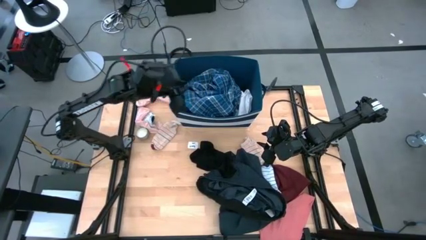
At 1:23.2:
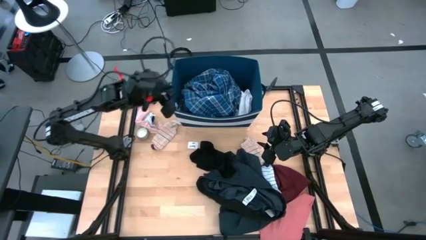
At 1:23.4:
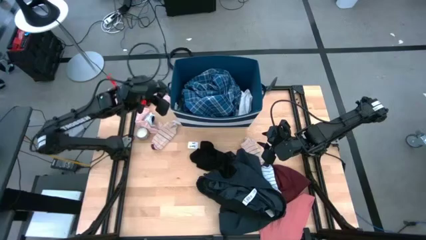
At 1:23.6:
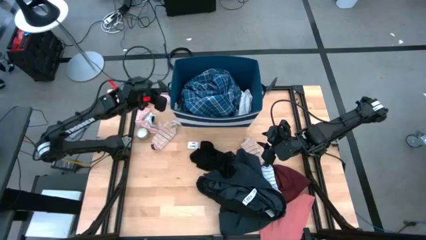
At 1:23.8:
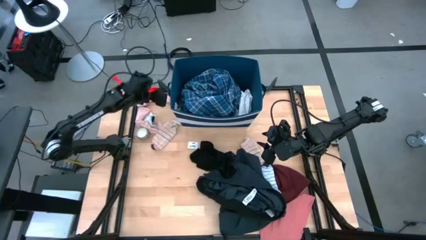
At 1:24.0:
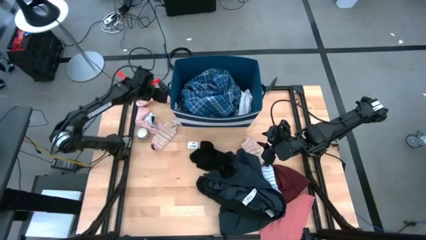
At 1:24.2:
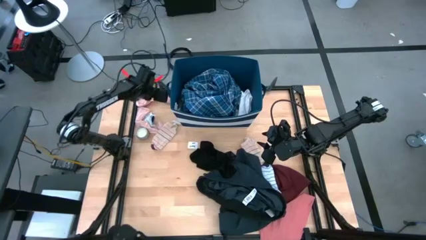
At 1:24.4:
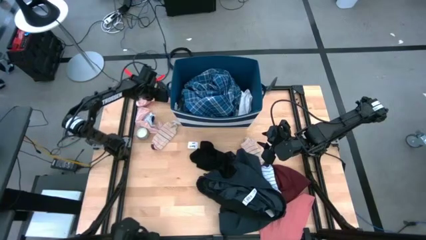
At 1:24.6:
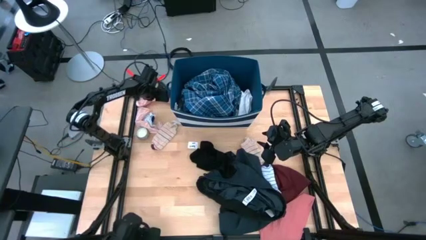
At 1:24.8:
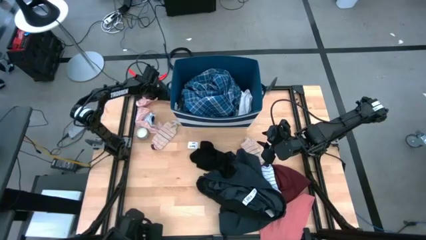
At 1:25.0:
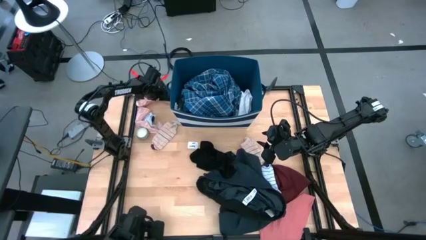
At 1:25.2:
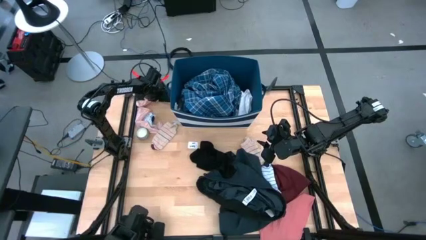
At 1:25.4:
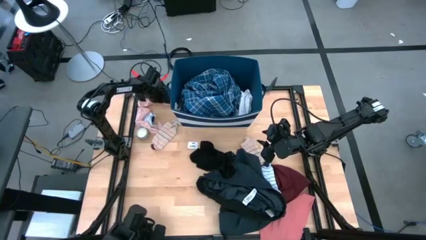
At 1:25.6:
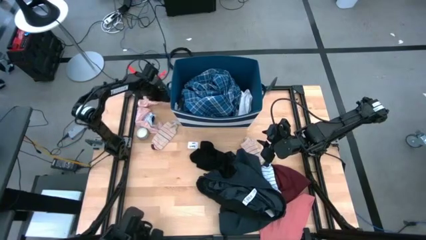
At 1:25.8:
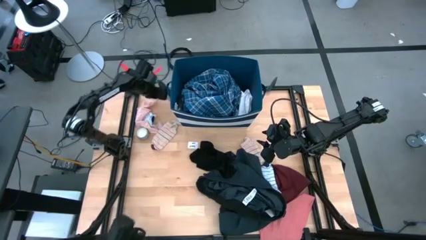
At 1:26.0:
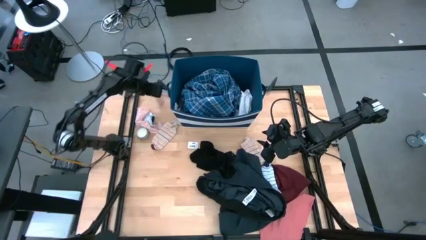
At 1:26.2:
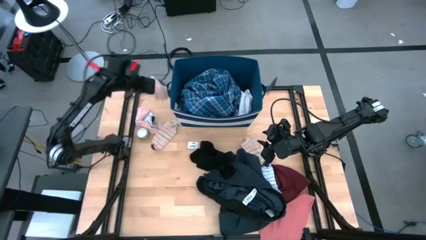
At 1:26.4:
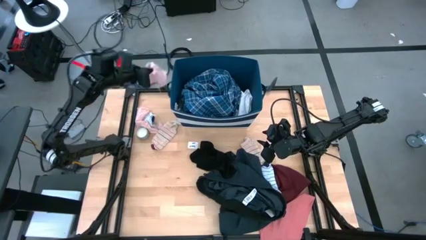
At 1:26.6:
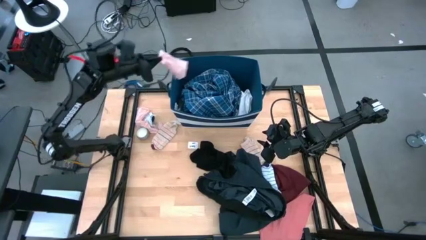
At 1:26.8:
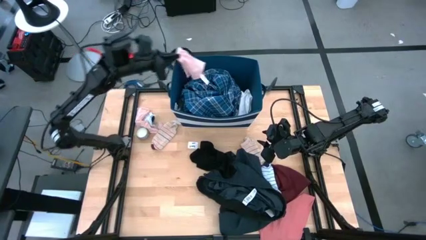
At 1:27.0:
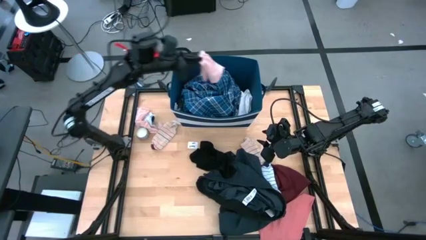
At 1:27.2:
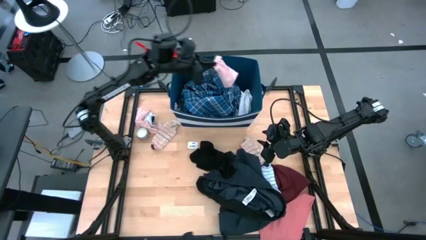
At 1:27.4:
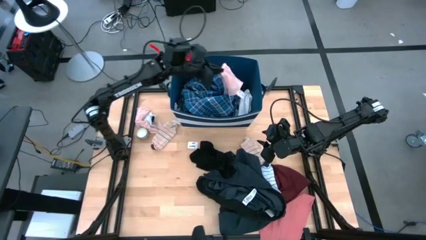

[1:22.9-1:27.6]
Task: Sort clothes
Put the pink sock into the laundry organizer

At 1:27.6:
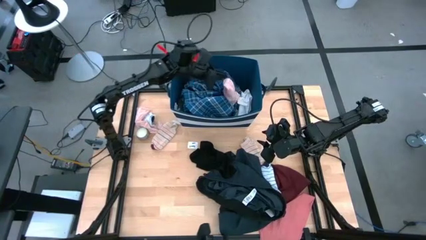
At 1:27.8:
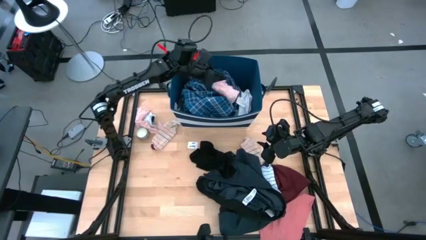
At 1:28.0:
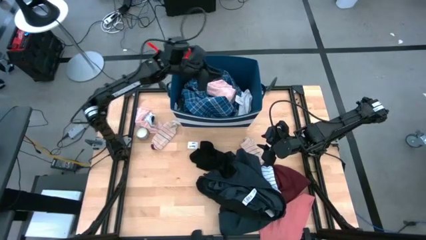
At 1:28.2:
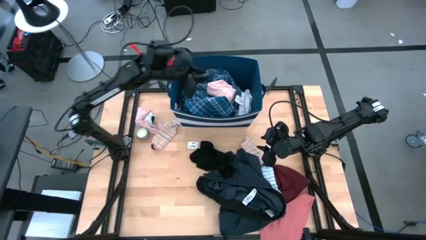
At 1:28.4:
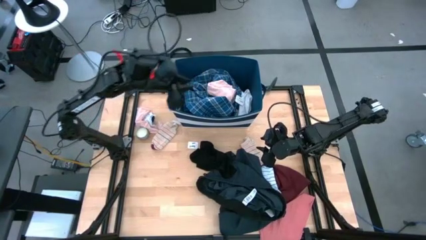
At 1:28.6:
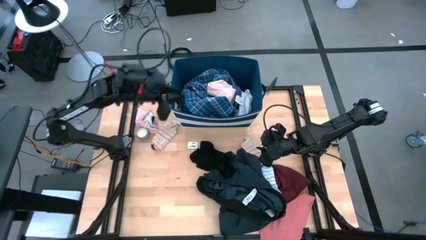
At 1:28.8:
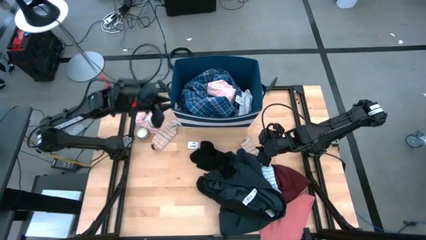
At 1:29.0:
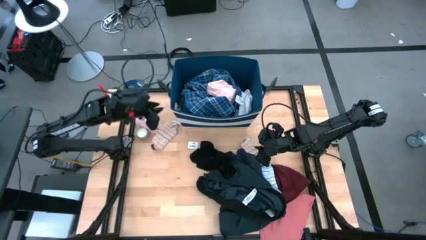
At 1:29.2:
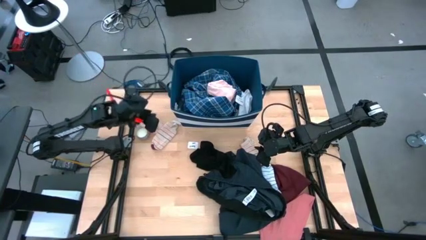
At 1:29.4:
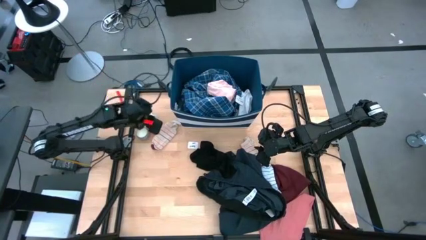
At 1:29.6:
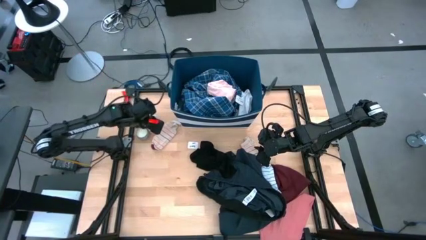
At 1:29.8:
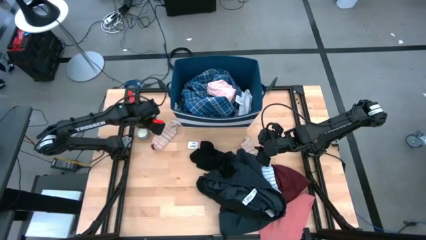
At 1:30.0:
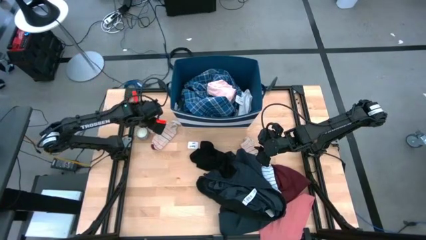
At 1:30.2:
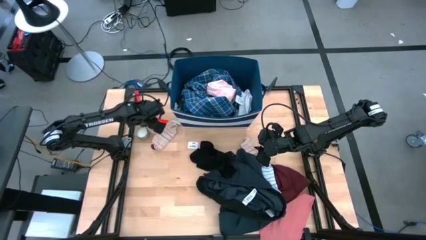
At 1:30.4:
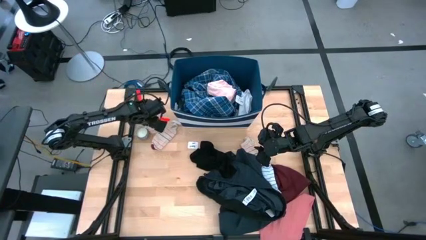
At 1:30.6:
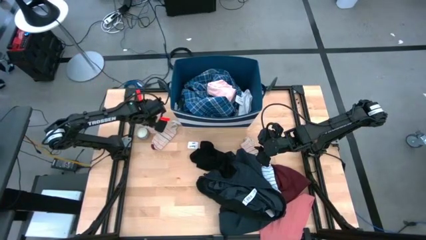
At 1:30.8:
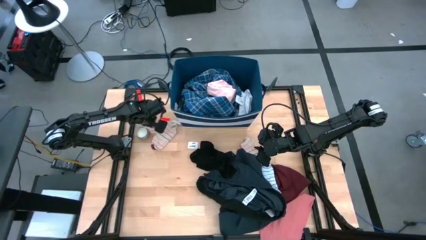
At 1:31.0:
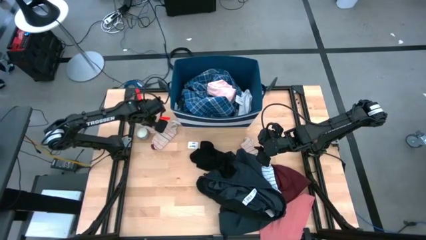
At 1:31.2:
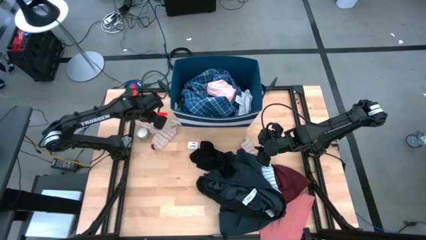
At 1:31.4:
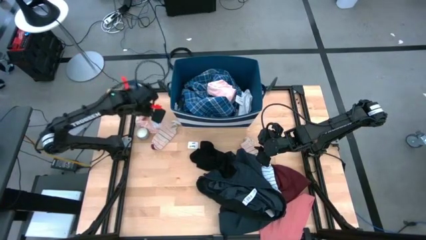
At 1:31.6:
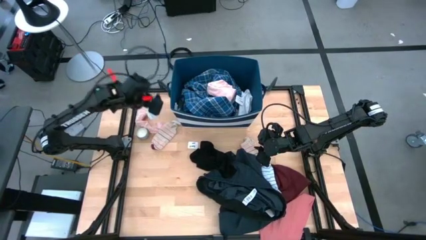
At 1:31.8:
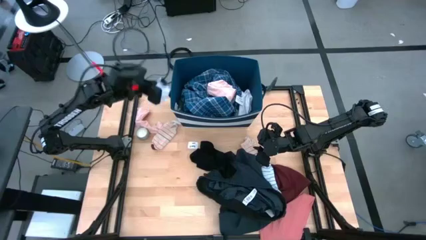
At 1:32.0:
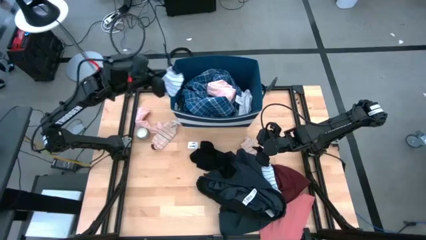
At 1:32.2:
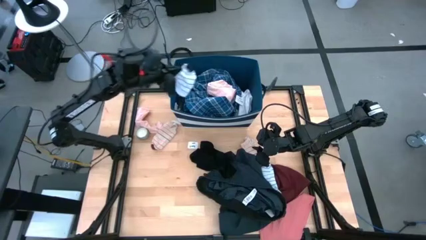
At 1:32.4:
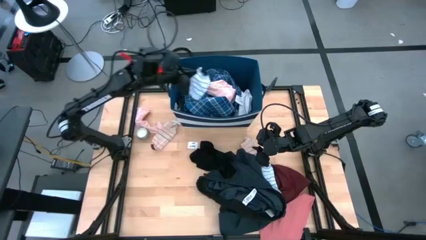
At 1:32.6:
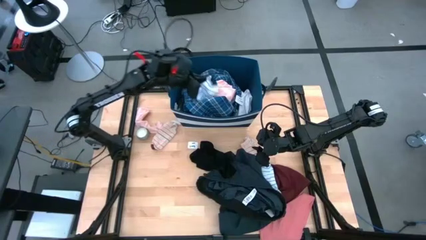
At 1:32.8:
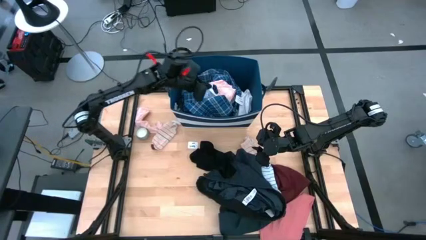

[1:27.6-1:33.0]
Put the white sock into the laundry organizer

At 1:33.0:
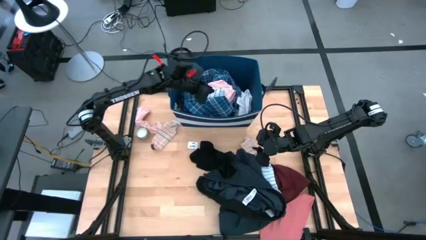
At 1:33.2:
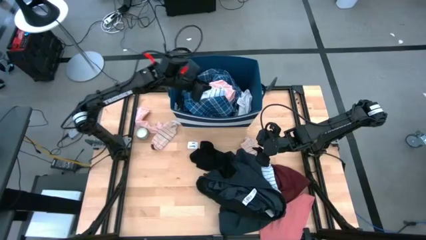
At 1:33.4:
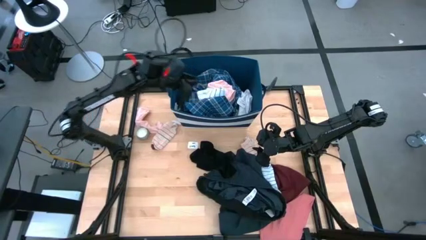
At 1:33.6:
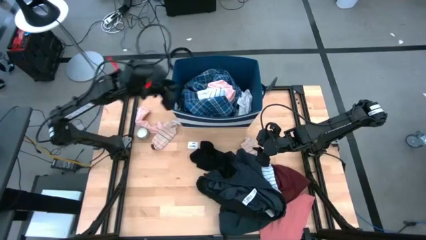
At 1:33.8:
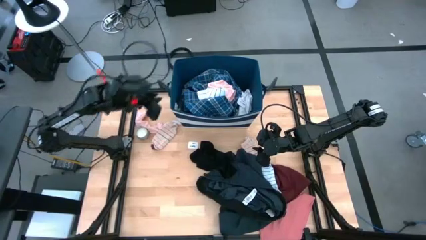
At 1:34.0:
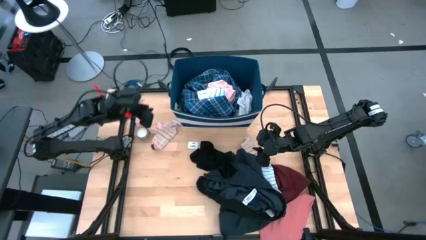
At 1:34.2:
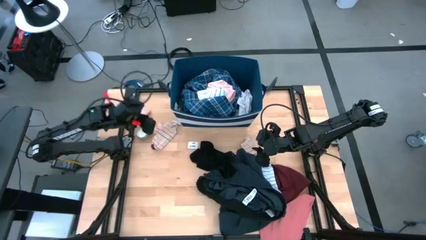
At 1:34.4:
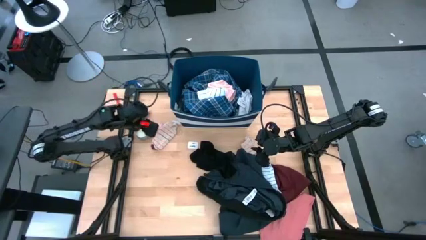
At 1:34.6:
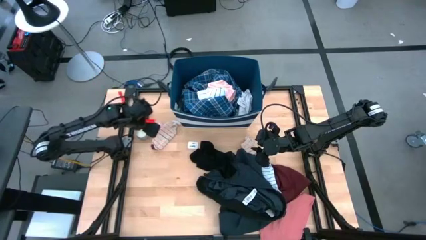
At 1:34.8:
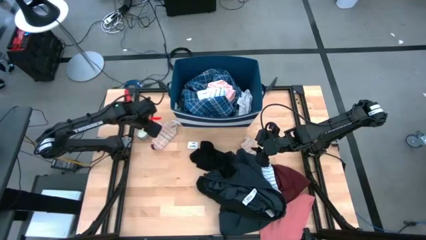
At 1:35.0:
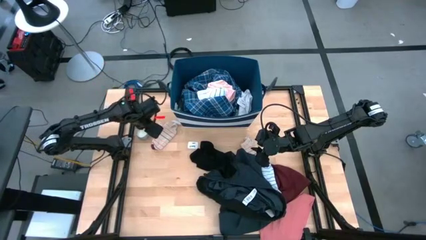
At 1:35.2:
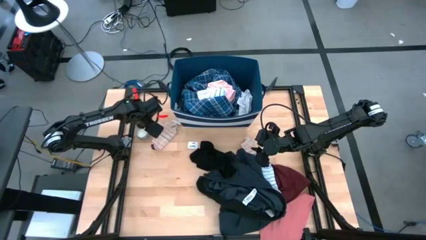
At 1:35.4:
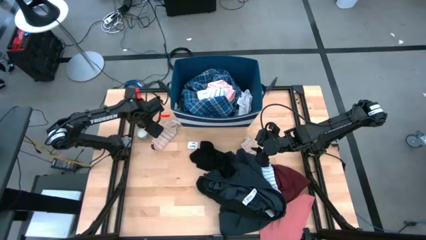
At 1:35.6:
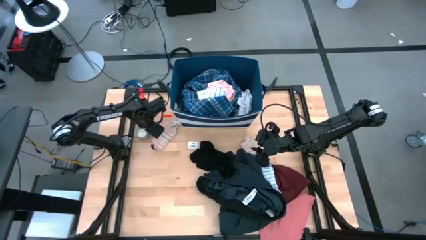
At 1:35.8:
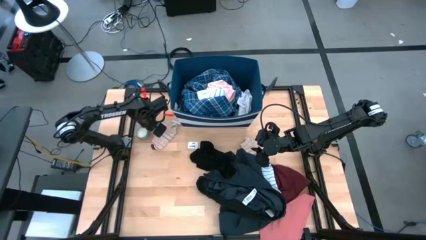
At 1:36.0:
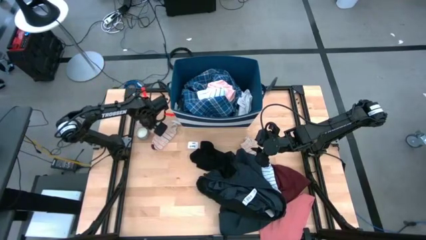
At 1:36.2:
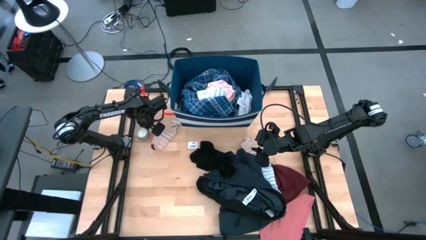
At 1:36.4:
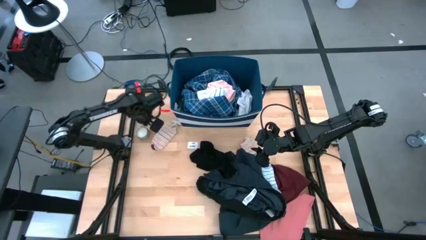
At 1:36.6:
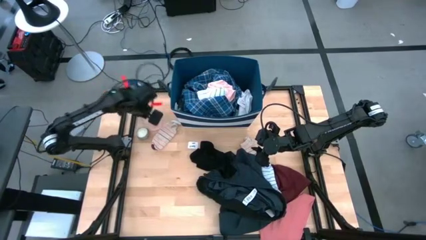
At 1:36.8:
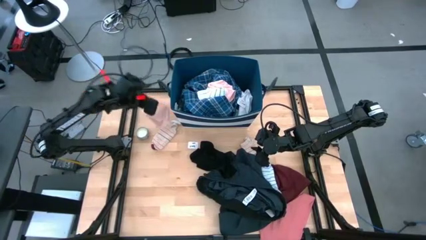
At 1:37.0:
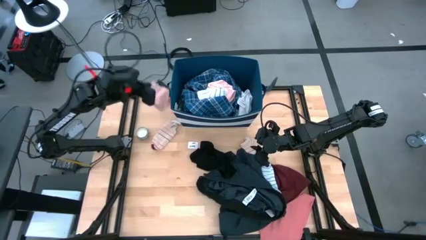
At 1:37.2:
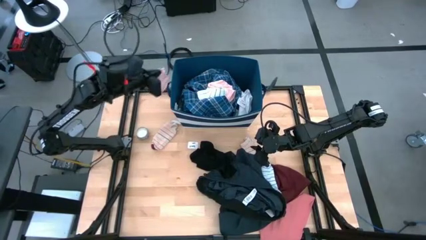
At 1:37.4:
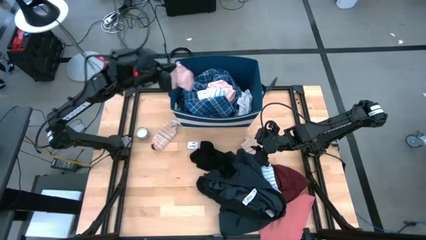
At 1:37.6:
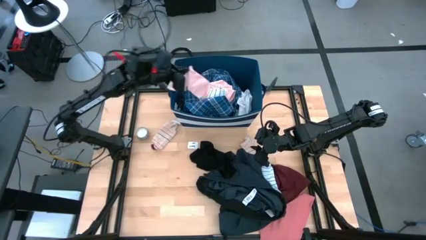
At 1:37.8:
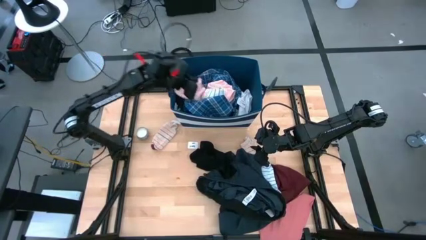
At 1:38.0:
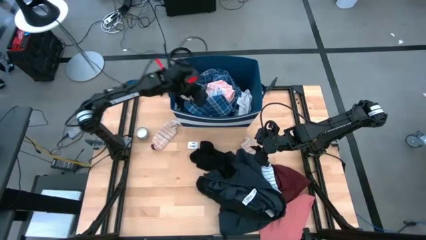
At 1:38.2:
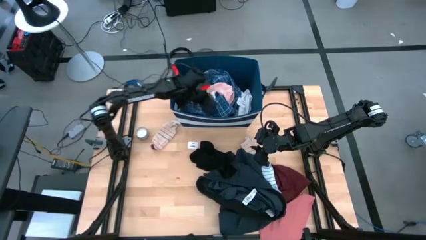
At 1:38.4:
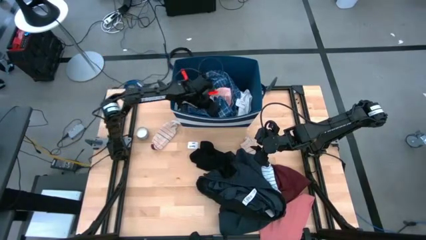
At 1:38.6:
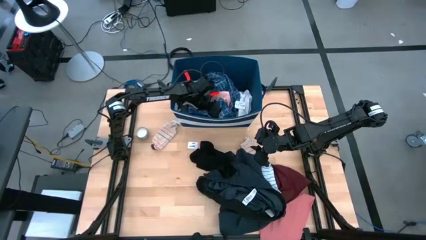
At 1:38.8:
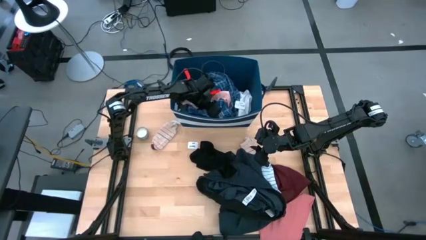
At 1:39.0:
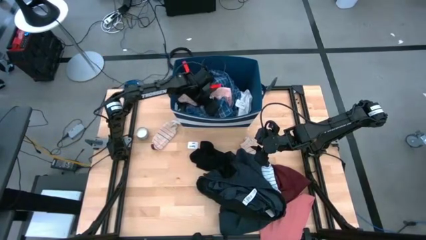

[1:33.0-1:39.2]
Put the pink sock into the laundry organizer
